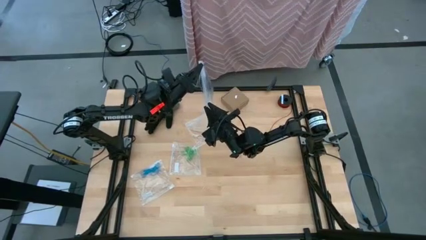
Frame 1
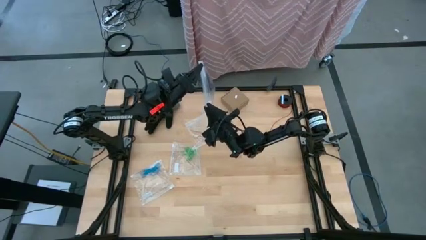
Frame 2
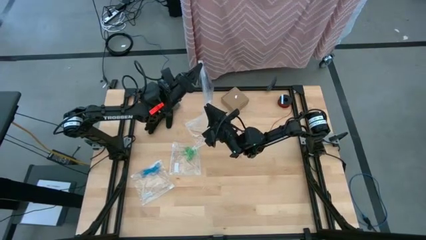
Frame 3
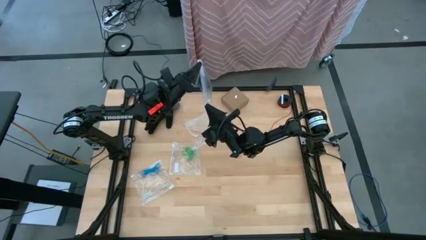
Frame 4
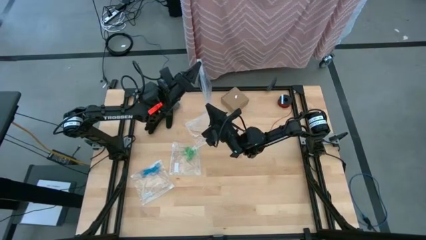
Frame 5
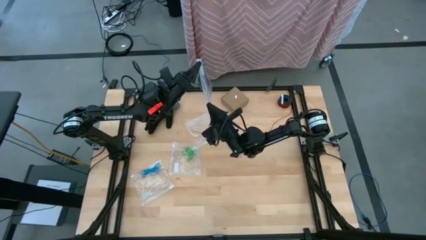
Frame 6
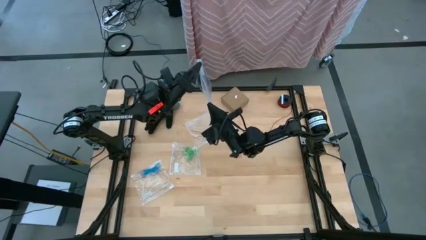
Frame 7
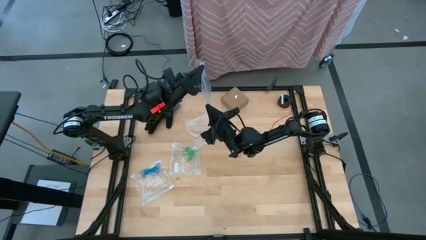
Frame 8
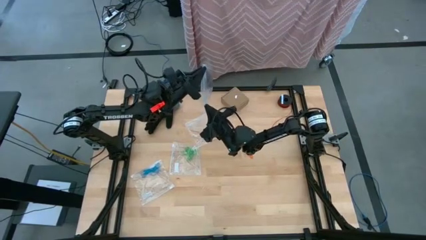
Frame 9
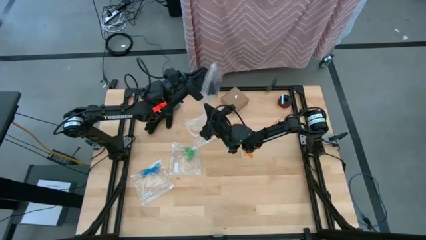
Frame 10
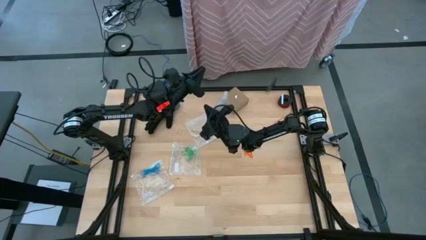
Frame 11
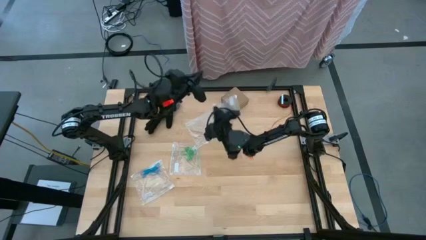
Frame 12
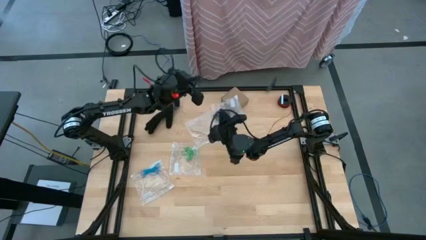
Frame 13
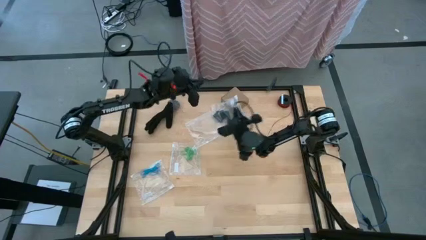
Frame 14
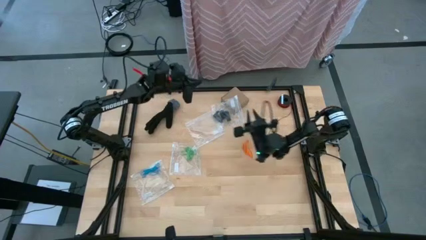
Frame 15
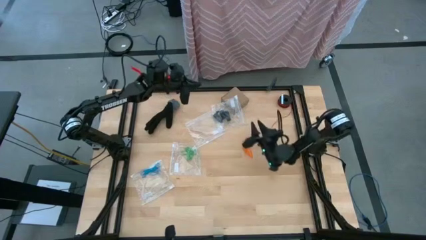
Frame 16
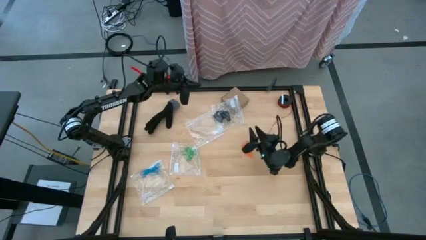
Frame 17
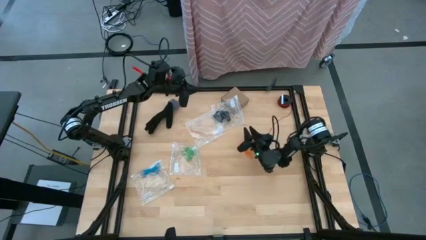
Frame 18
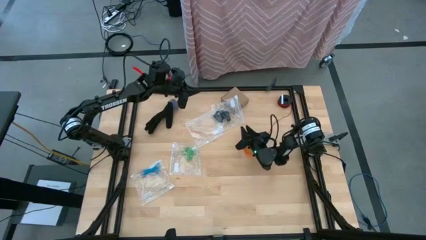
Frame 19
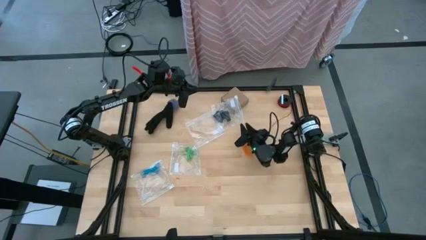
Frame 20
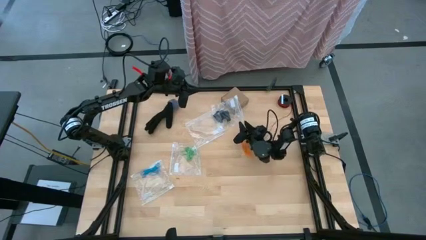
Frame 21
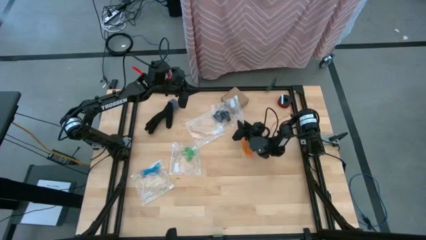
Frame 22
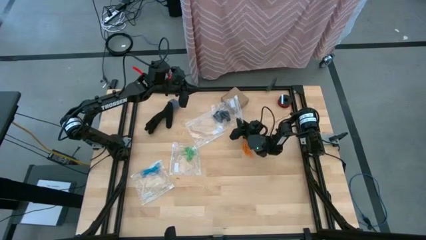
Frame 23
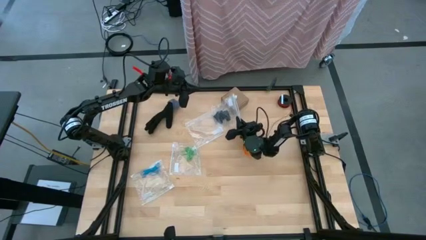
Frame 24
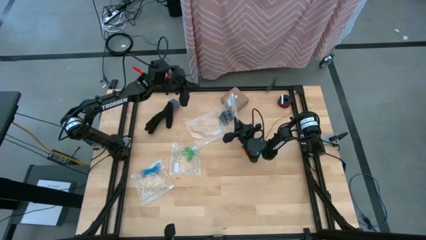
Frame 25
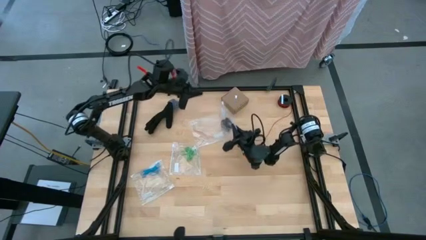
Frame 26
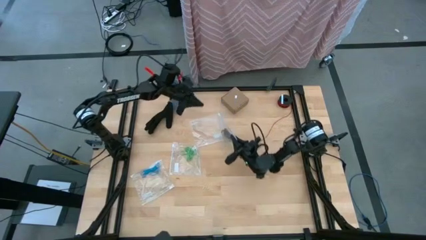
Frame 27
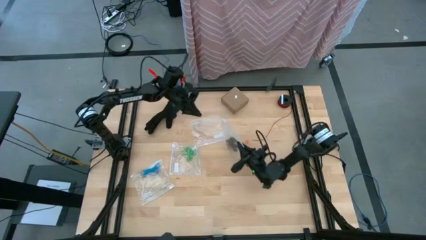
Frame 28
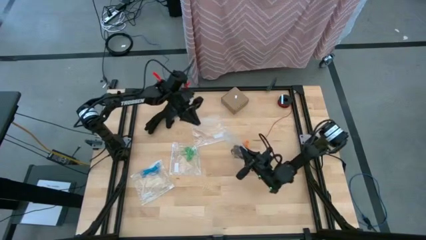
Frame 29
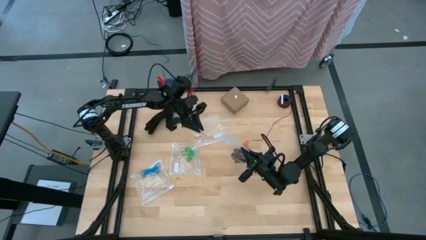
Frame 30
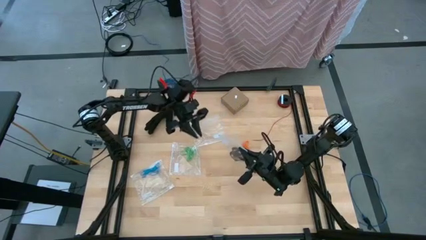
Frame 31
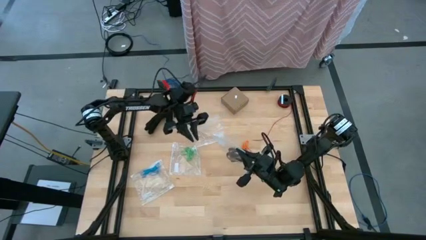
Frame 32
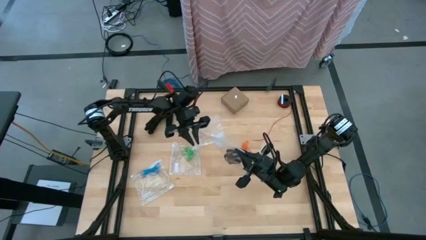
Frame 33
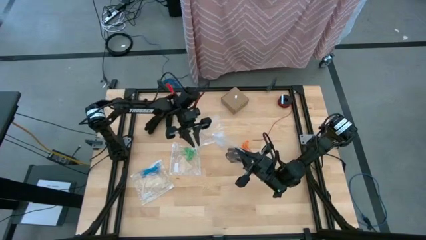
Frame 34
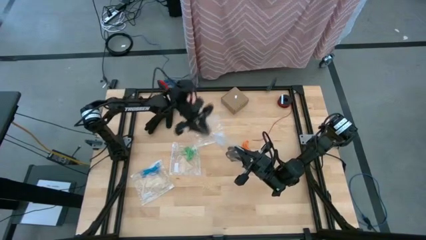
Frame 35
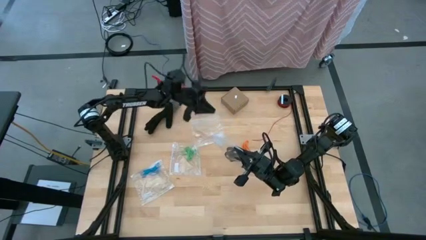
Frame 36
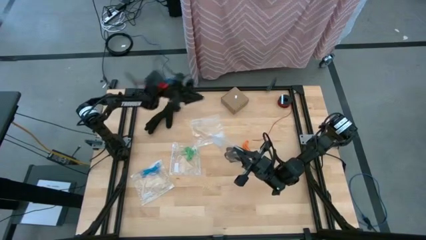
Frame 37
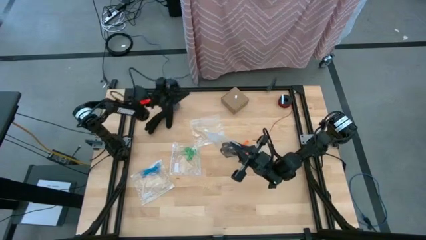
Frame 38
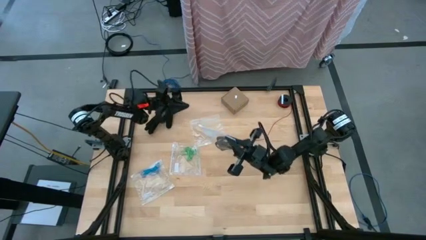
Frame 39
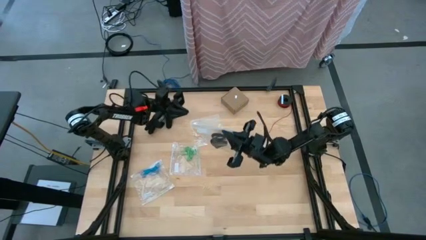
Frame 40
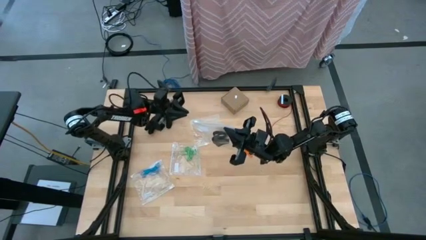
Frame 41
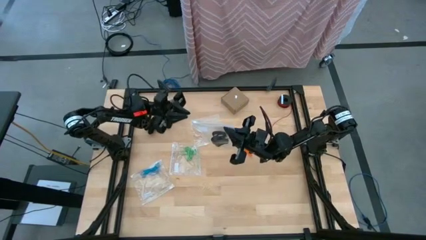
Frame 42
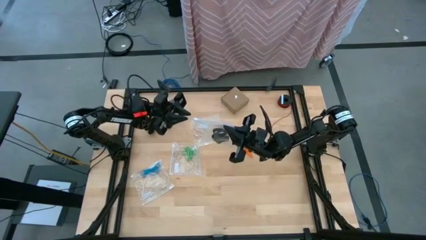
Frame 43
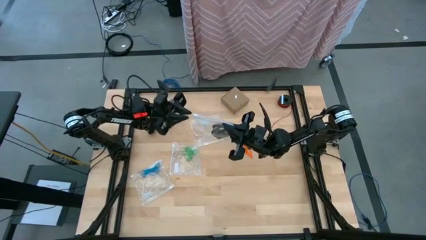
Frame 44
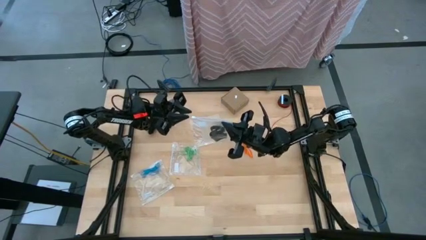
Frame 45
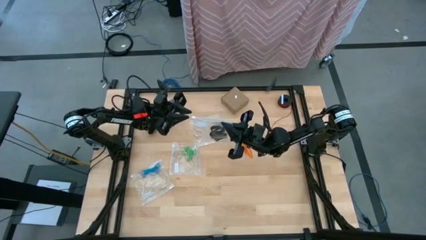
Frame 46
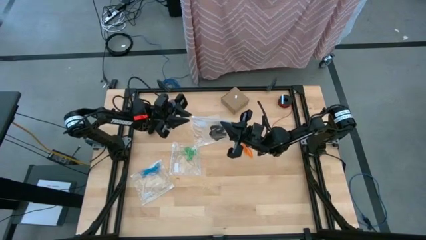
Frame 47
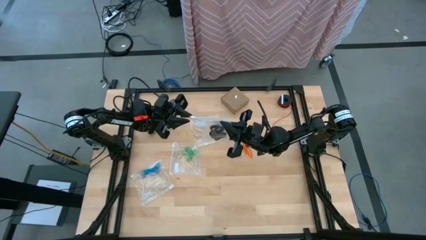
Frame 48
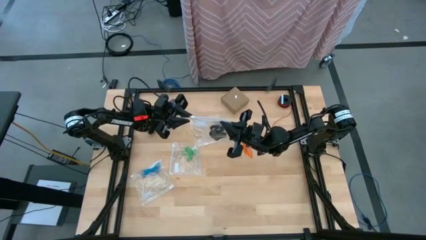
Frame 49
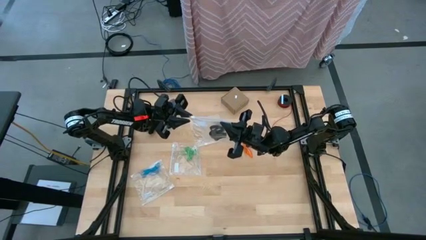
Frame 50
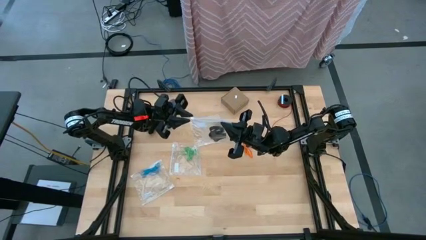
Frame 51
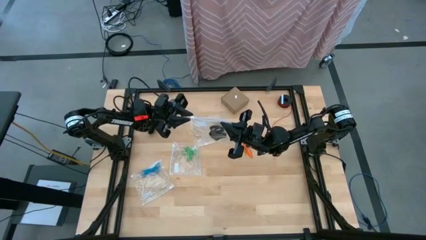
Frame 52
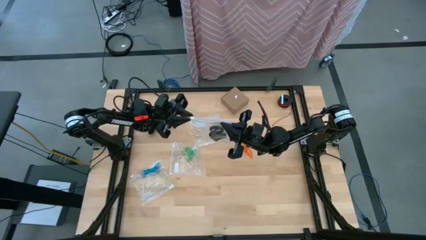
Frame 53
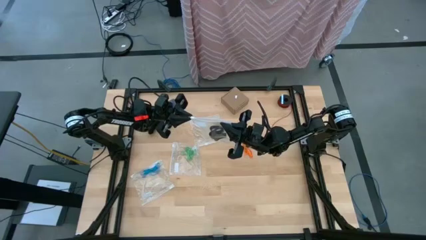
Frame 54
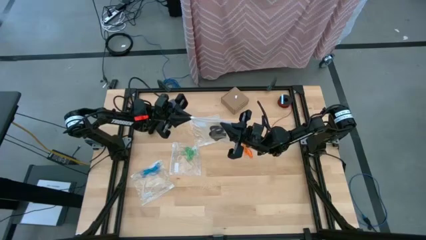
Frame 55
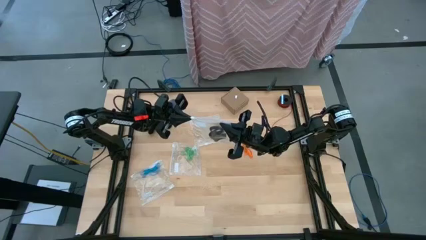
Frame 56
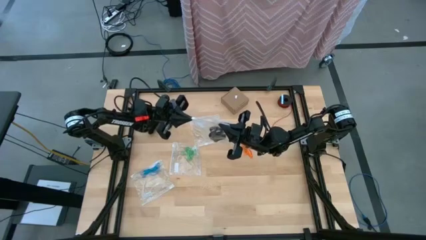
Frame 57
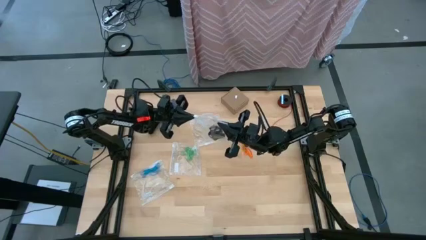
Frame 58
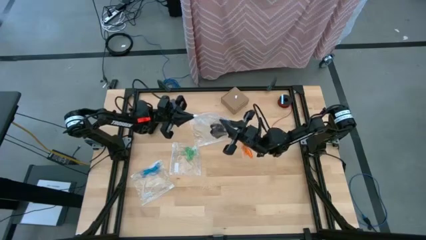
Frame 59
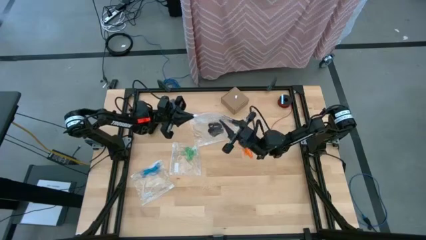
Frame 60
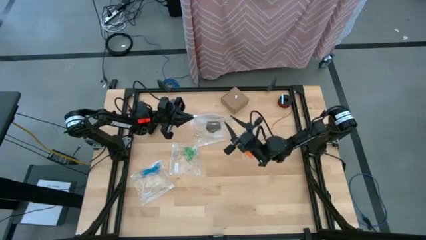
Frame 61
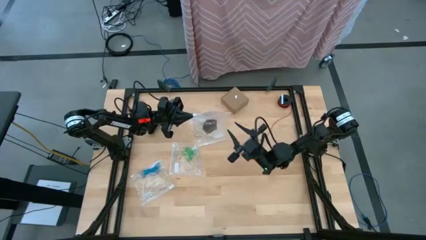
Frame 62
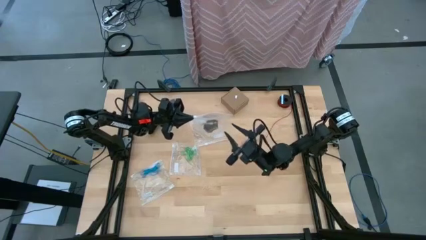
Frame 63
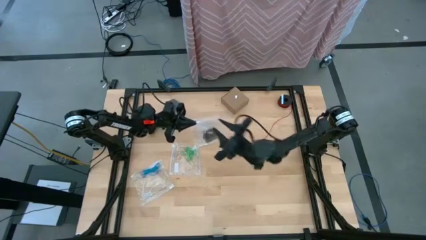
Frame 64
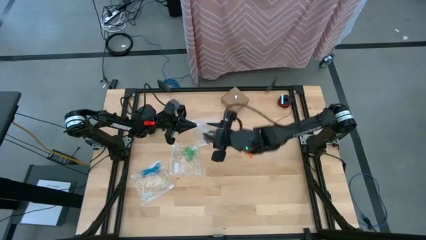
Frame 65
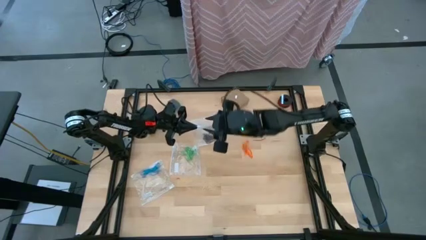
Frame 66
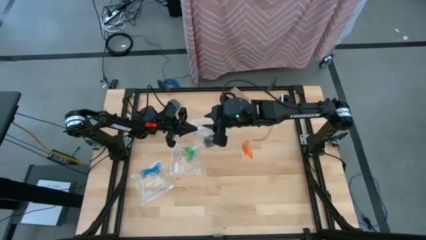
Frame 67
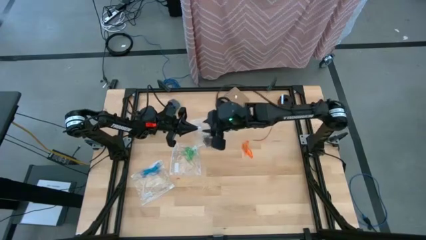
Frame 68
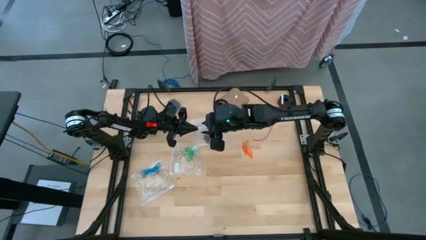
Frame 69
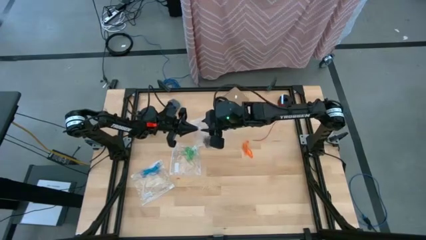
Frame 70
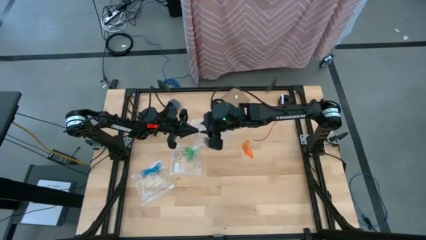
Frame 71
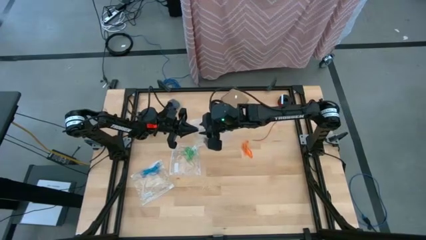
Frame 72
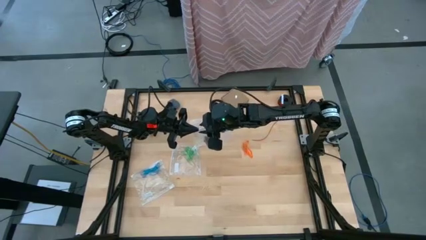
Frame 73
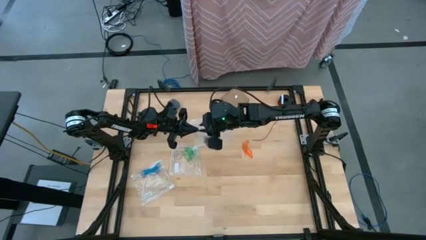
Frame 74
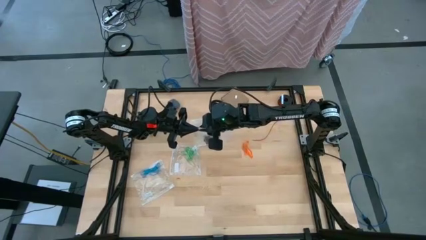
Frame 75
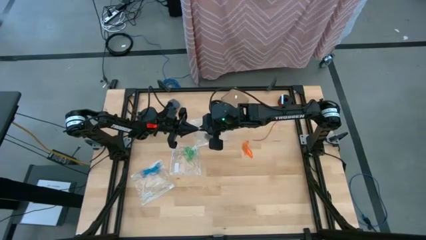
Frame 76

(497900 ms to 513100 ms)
Task: Sort rubber bands
Close the transparent zip bag

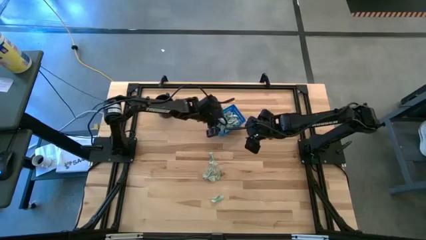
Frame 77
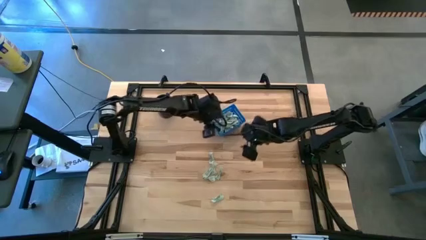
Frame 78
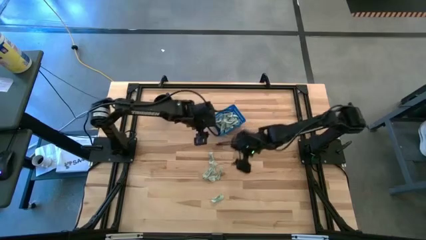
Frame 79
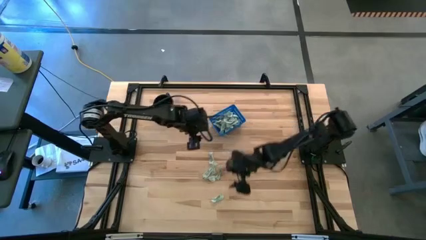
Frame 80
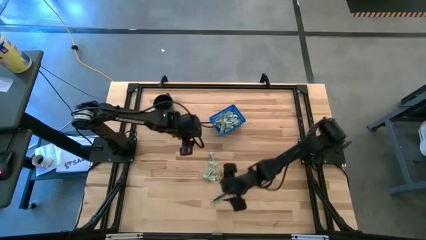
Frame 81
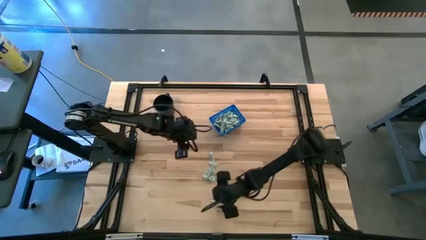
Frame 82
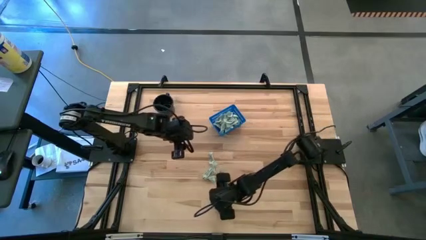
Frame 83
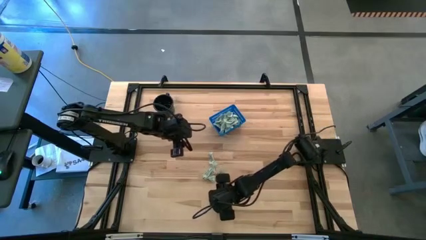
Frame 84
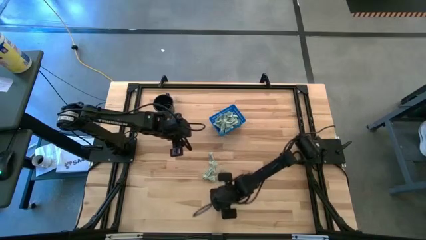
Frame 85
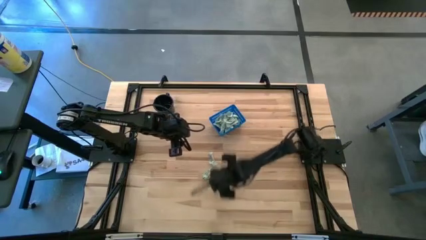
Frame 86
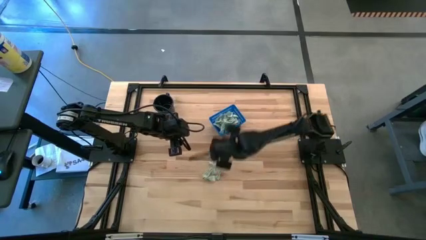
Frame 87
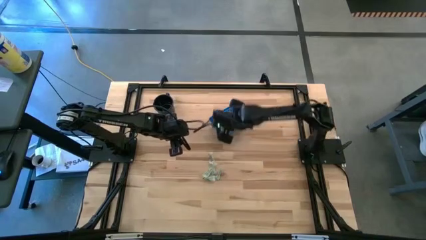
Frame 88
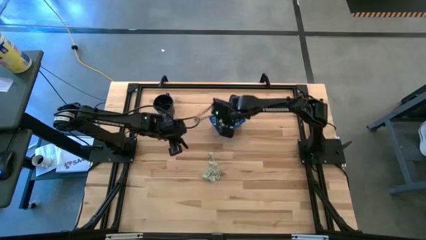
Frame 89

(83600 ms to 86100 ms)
Task: Pick and place Stevia / Truvia into bins
Put the green stevia packet into the blue bin
